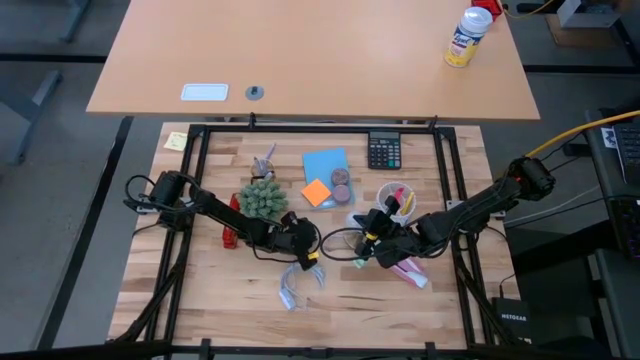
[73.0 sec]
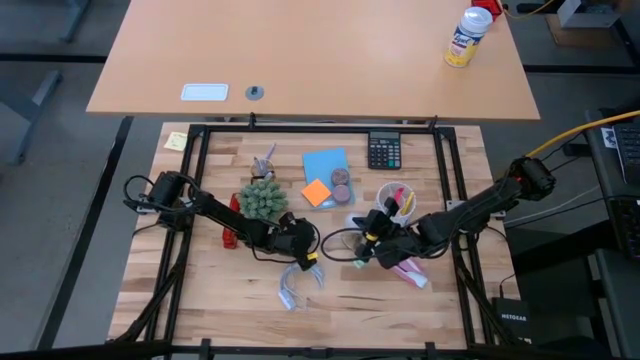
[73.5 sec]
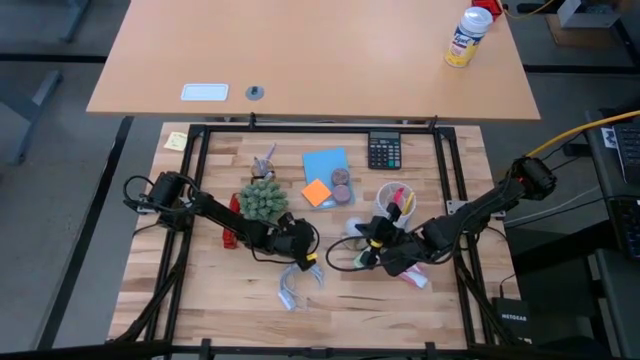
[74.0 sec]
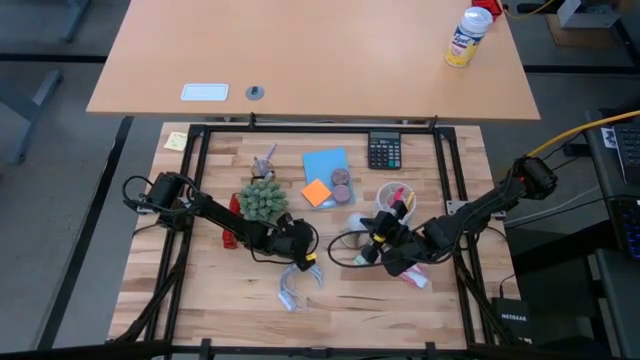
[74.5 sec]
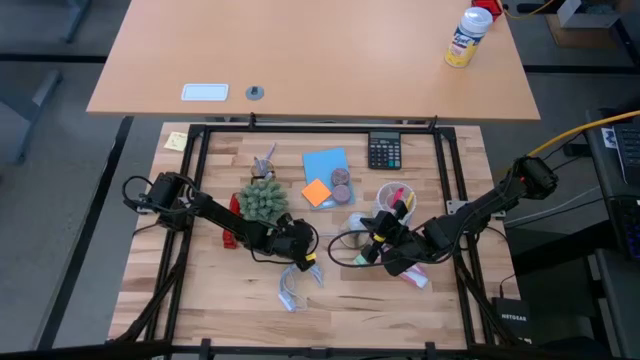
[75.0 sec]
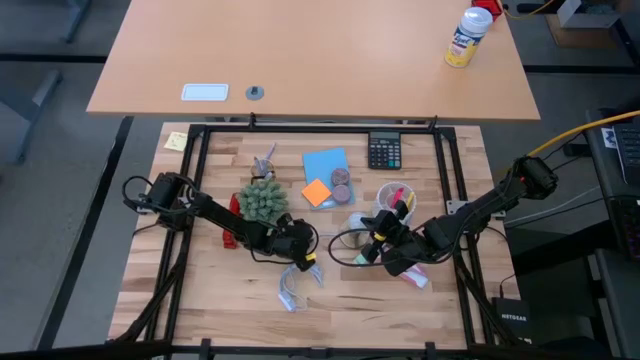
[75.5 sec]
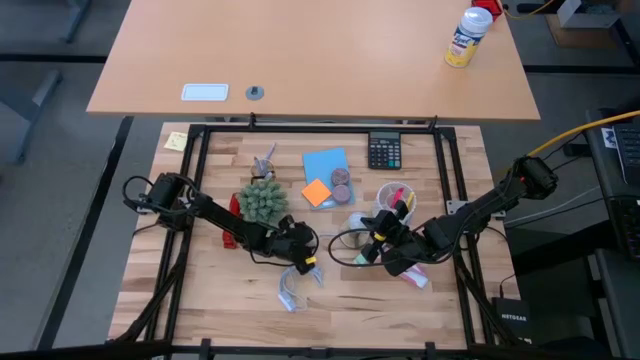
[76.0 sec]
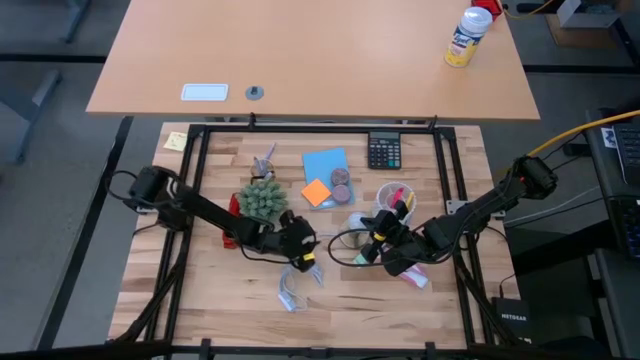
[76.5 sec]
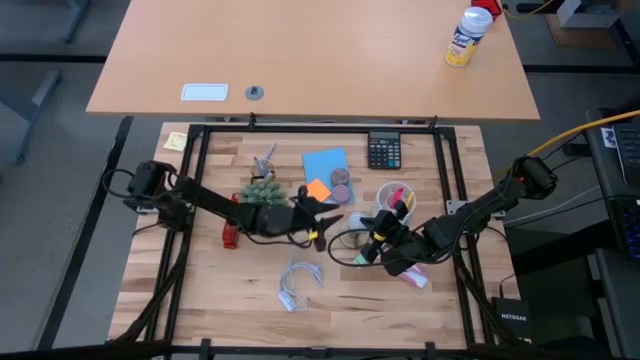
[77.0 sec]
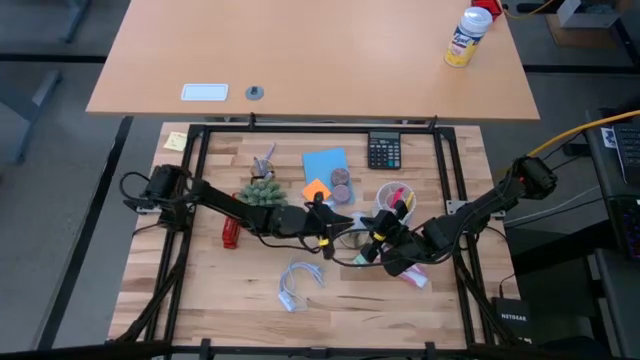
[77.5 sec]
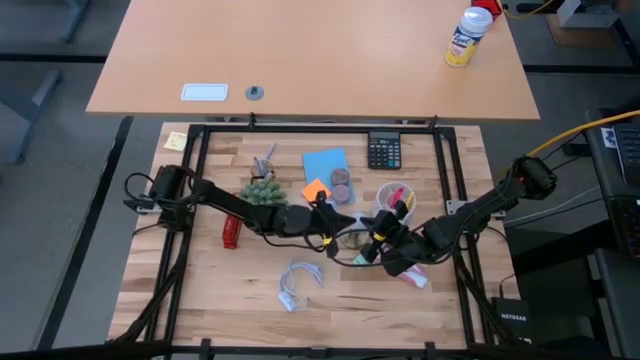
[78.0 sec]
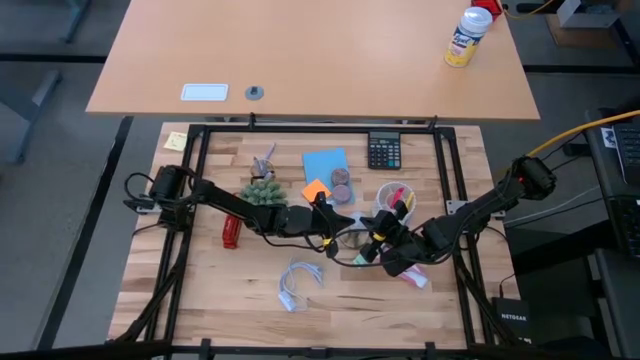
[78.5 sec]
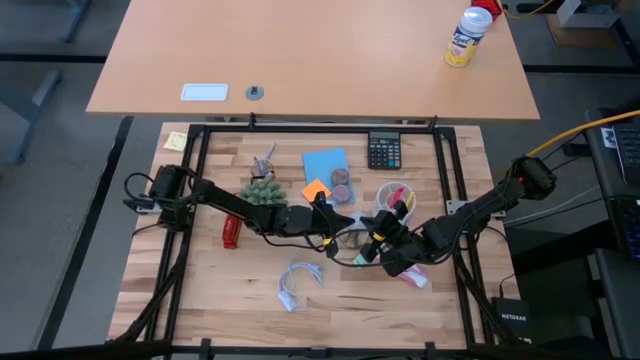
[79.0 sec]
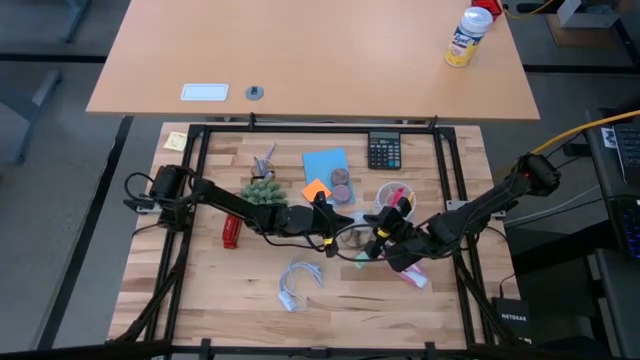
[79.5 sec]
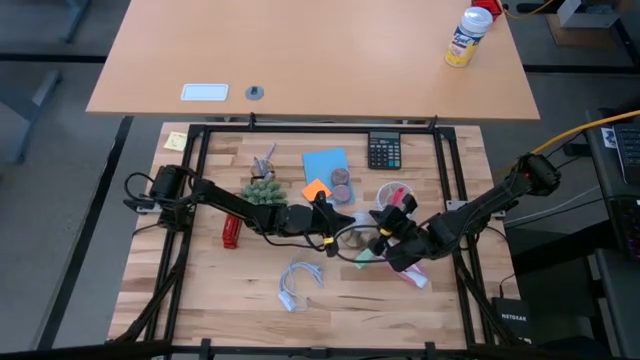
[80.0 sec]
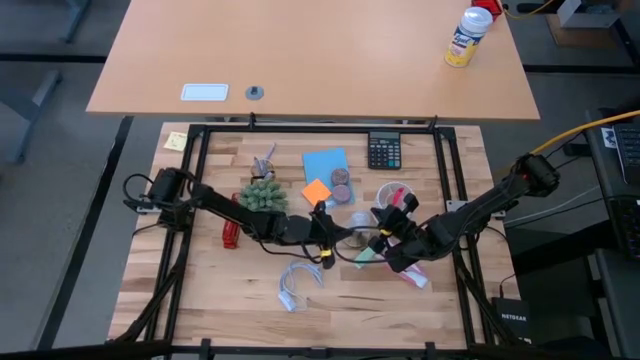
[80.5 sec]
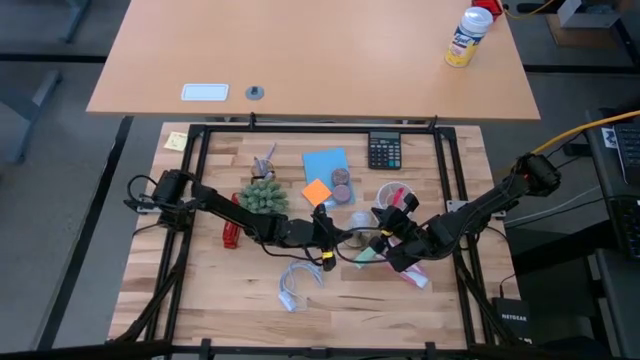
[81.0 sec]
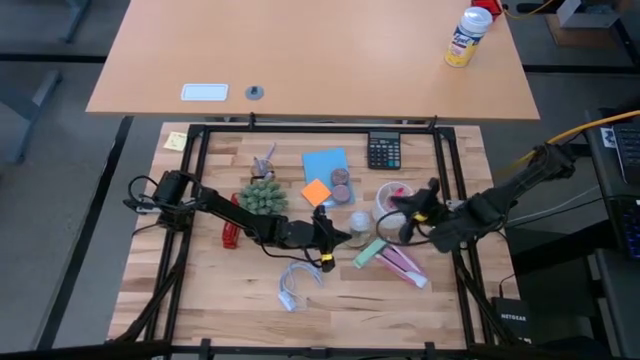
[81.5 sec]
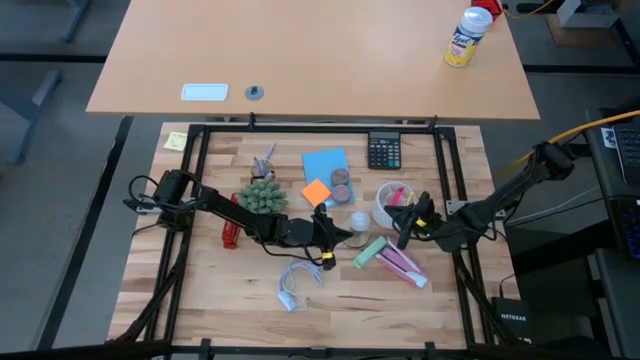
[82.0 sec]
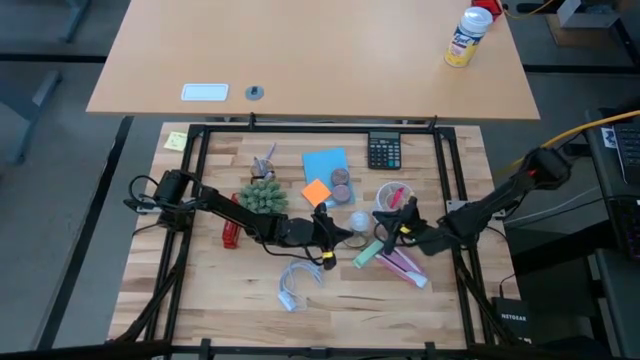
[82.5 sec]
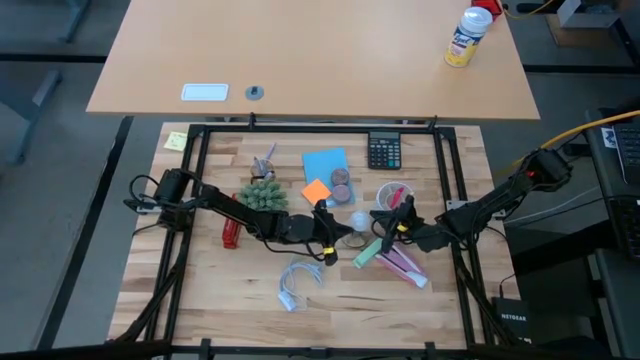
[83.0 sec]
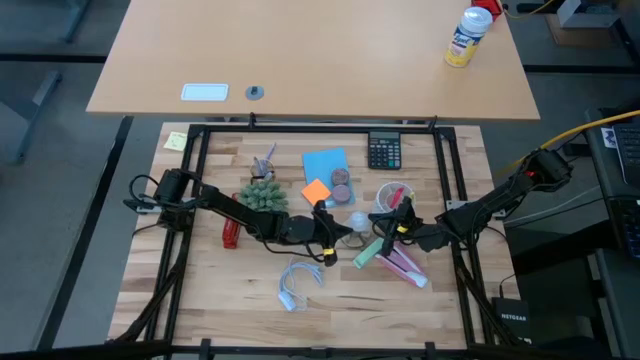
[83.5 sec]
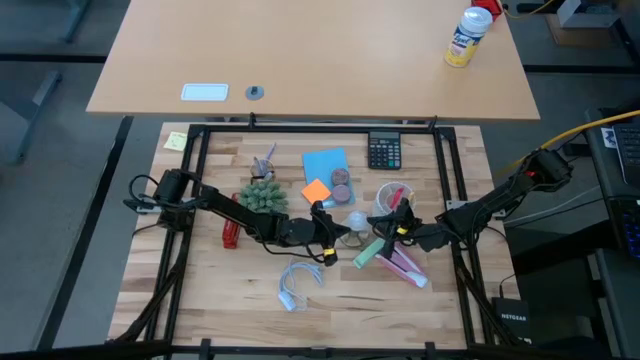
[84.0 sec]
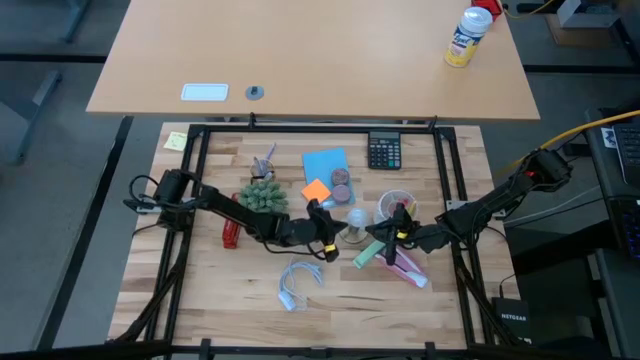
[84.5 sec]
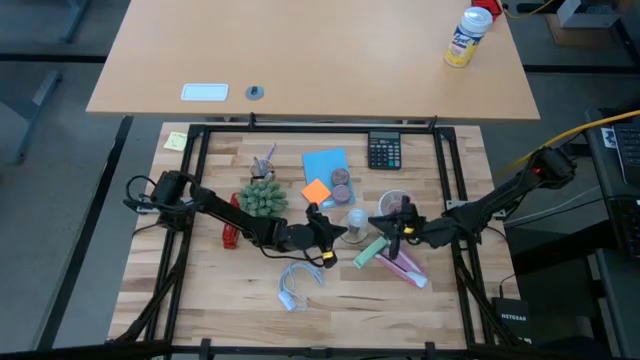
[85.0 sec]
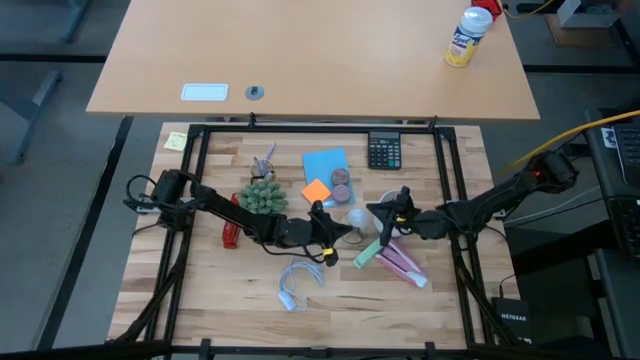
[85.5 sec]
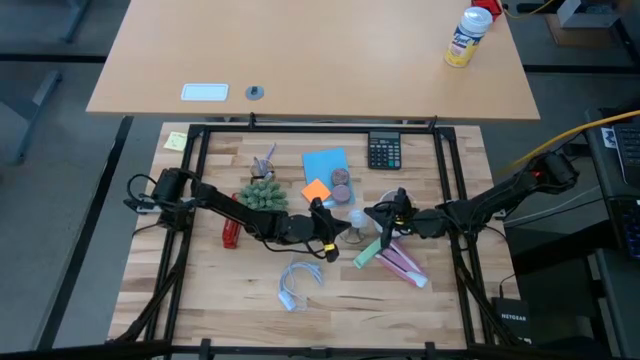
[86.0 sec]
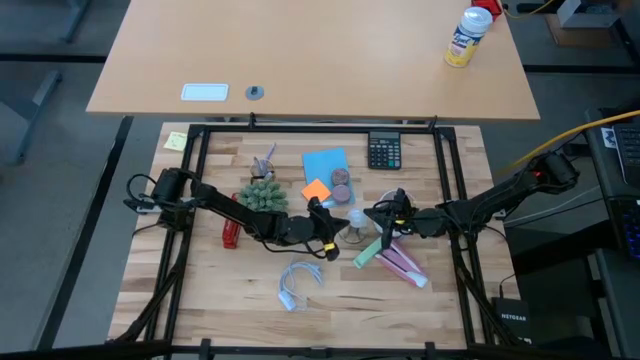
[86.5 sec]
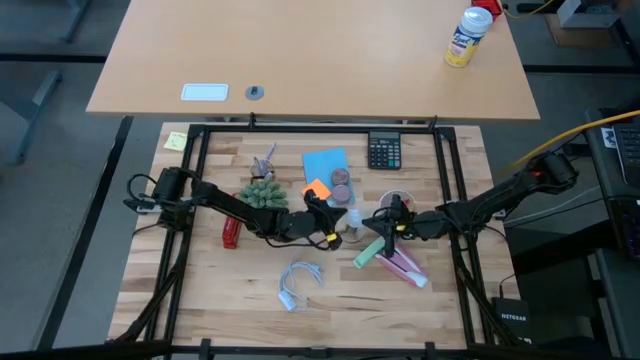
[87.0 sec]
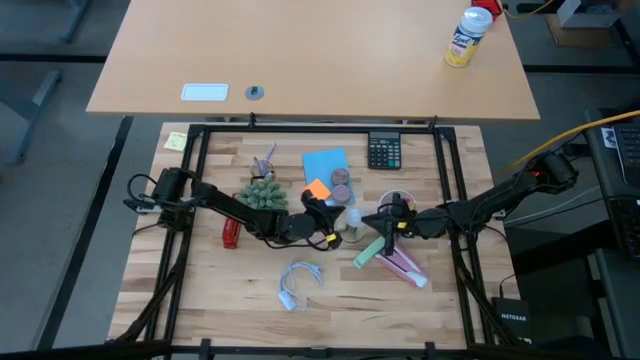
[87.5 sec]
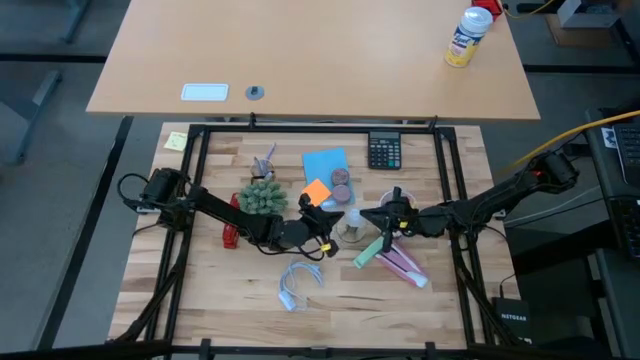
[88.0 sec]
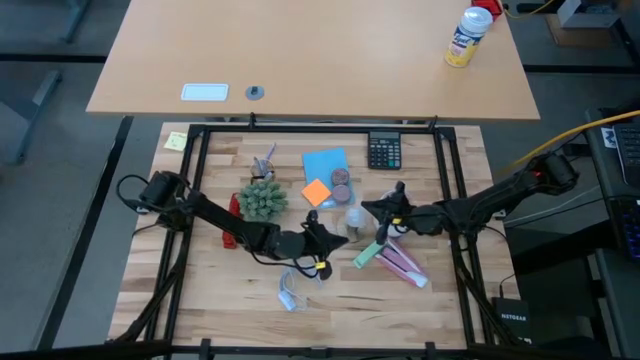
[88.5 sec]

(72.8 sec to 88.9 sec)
Task: Screw lightbulb
Insert the white lightbulb into the lamp socket

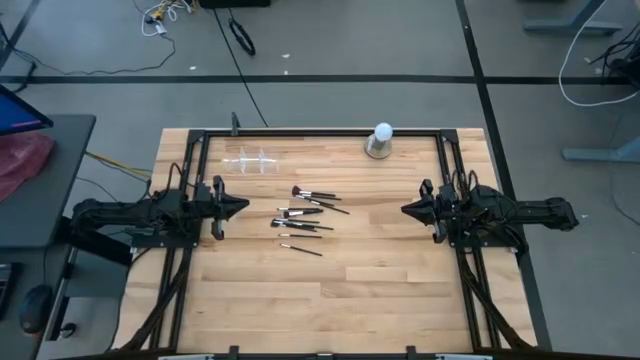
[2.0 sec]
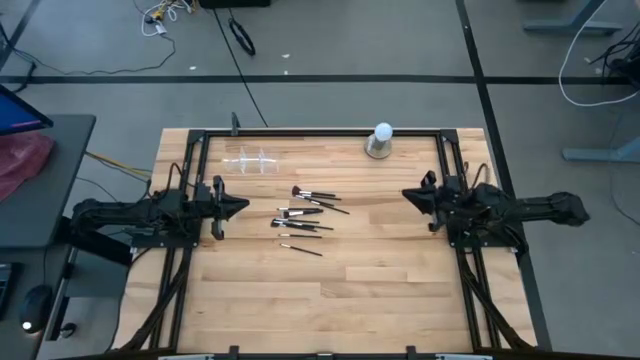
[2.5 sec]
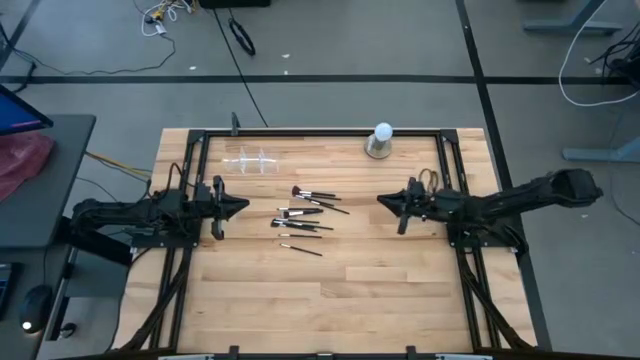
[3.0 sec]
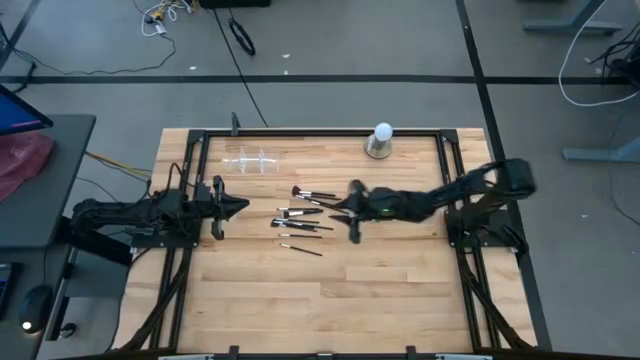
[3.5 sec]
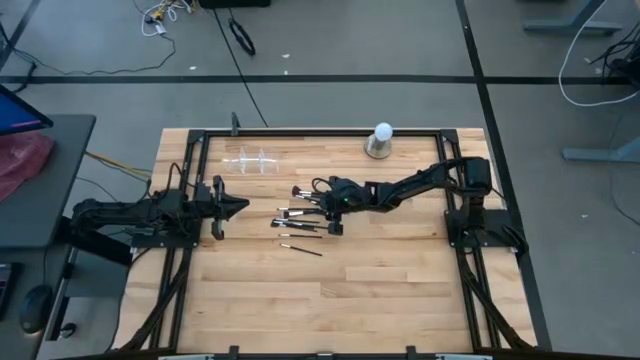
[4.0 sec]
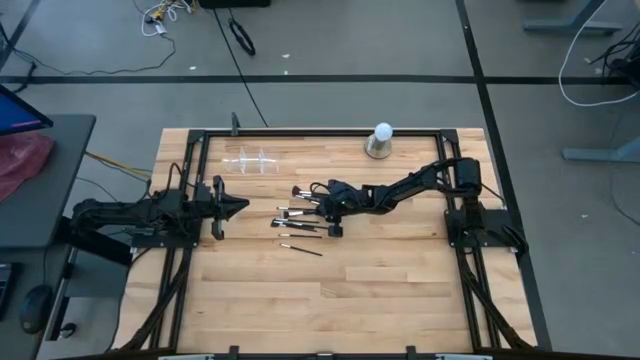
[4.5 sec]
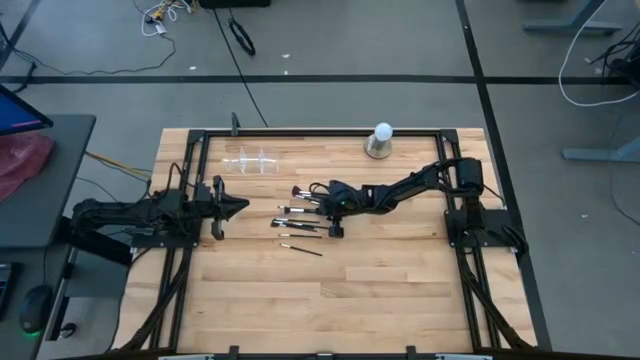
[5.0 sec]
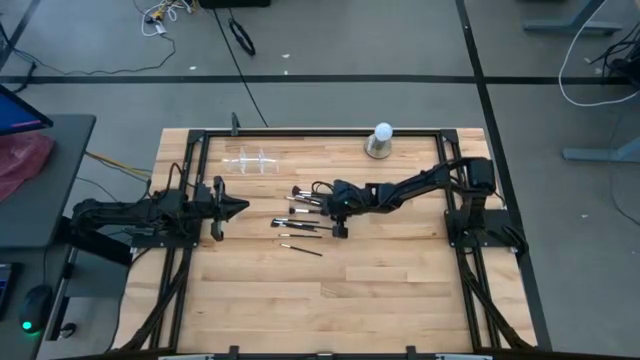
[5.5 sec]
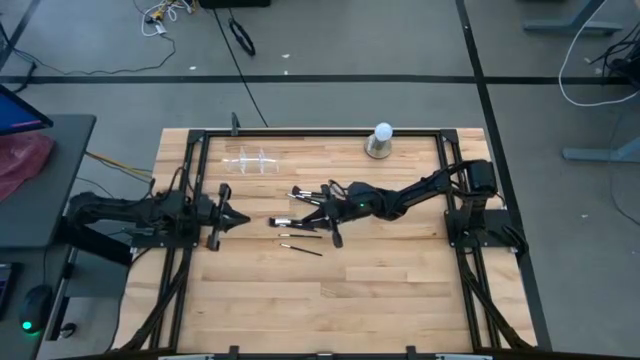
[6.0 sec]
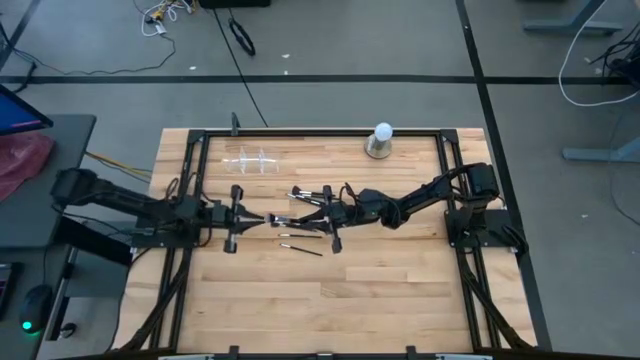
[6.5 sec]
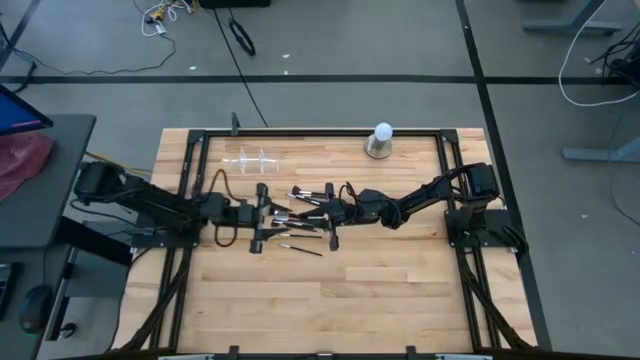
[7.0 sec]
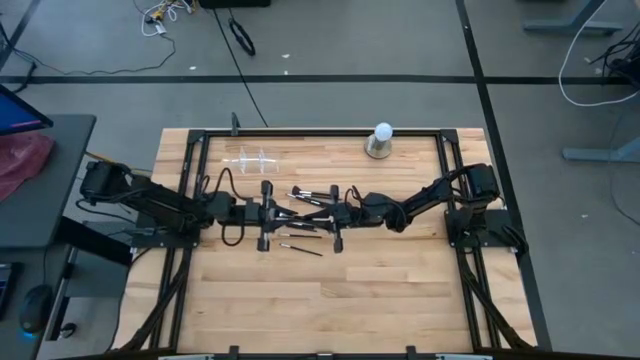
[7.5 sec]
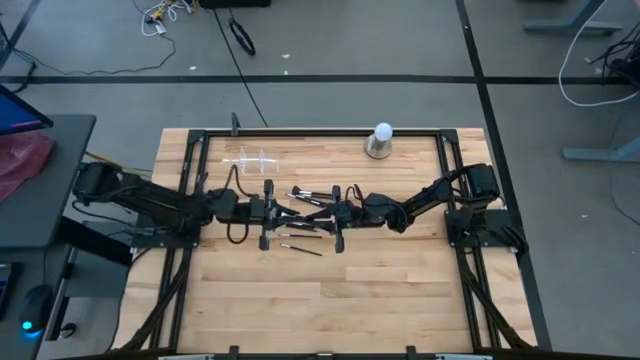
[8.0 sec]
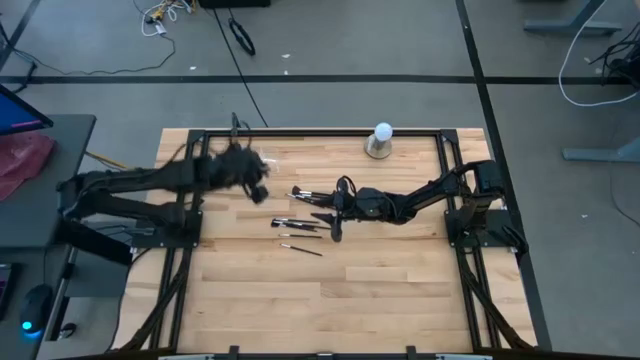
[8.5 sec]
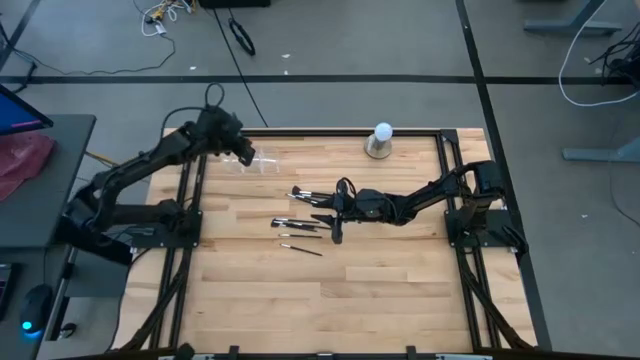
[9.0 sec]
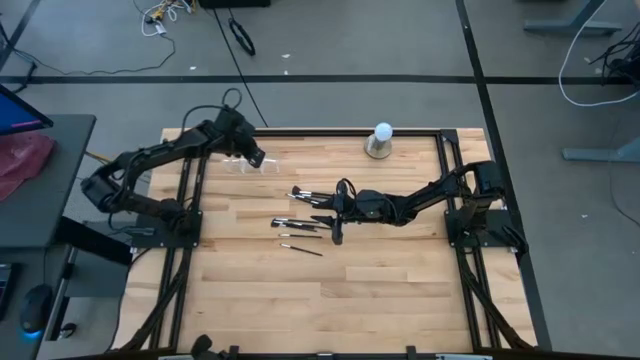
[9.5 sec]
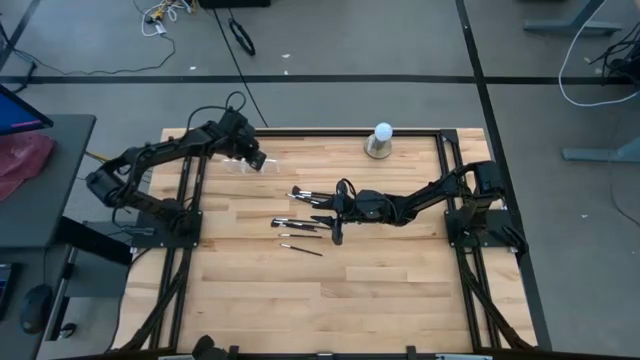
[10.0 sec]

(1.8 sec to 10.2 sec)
Task: Put items in baskets/containers
Put the blush brush into the transparent organizer
